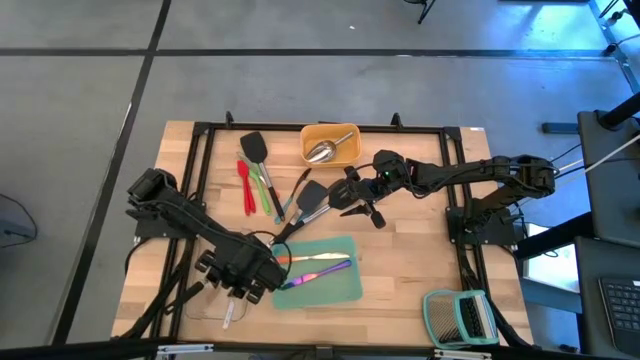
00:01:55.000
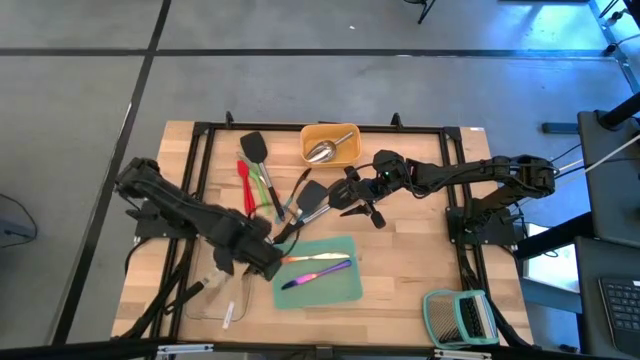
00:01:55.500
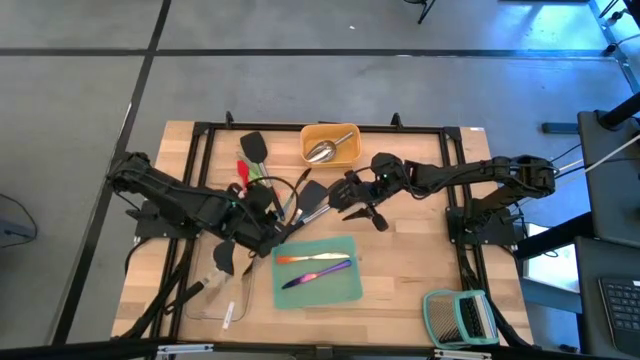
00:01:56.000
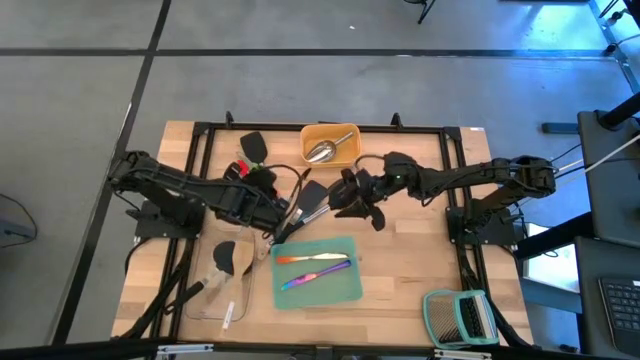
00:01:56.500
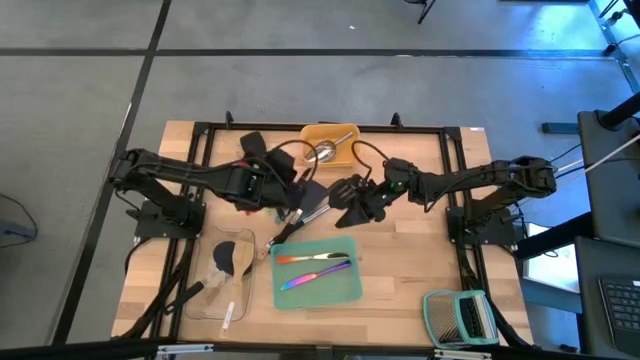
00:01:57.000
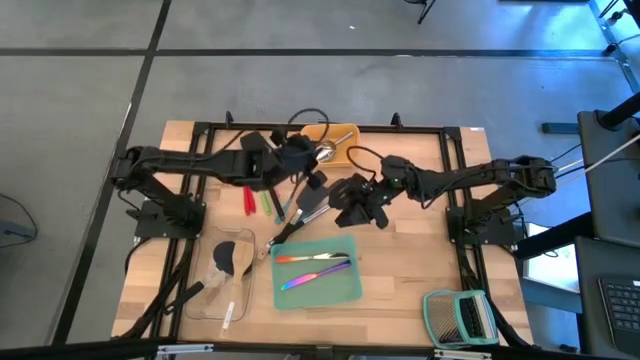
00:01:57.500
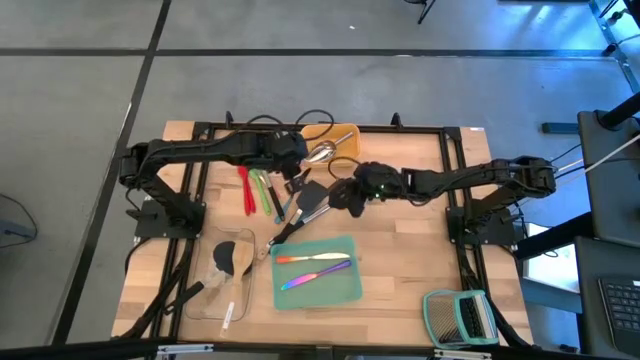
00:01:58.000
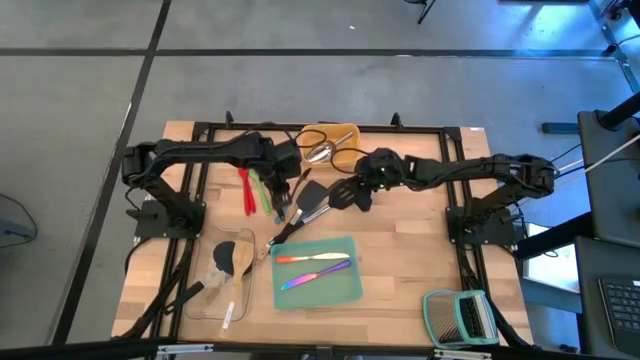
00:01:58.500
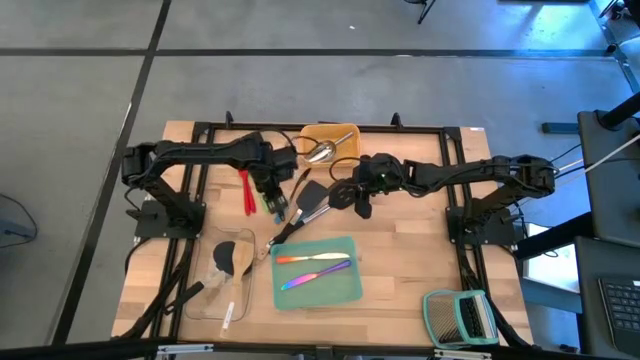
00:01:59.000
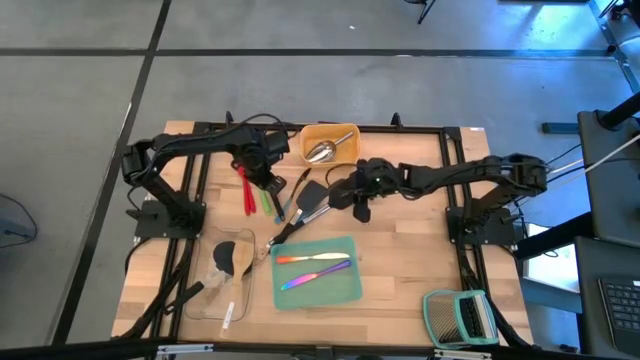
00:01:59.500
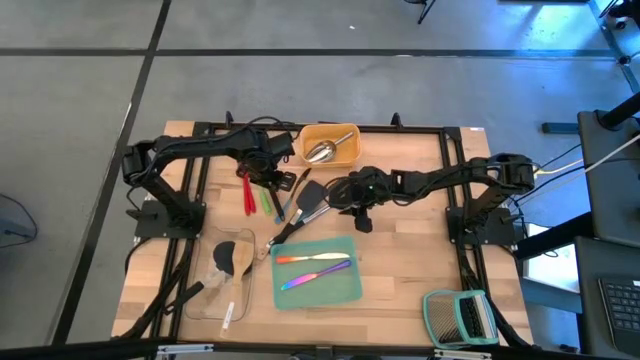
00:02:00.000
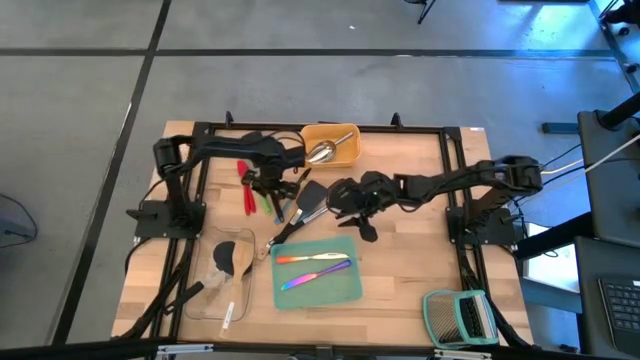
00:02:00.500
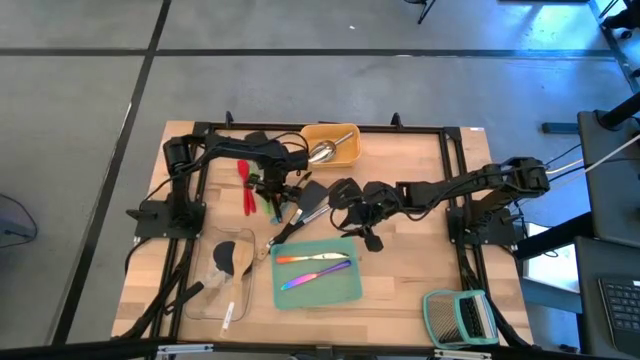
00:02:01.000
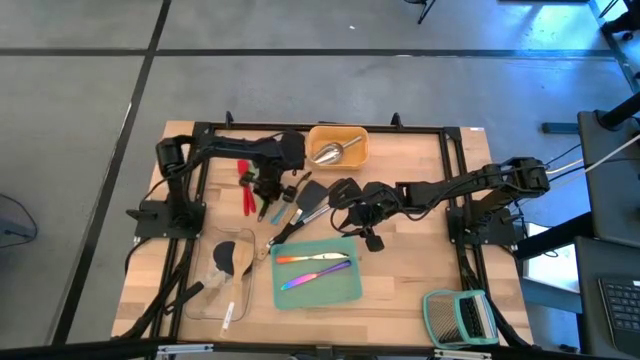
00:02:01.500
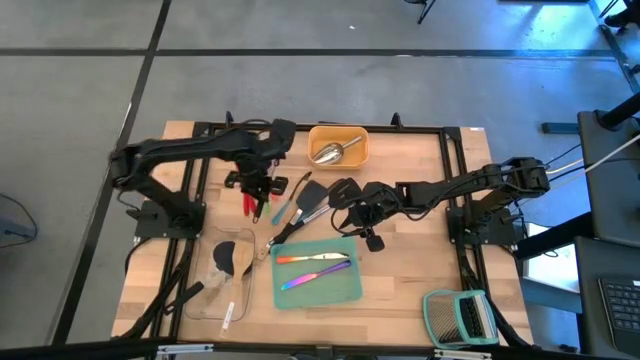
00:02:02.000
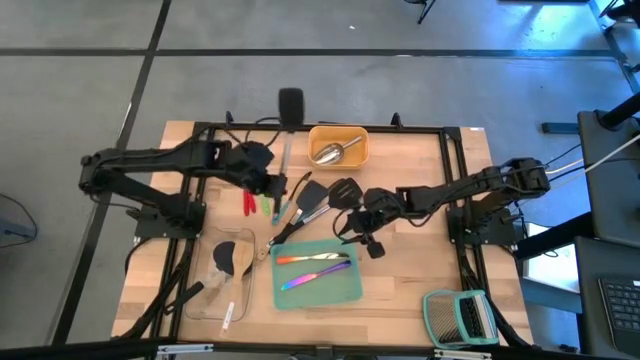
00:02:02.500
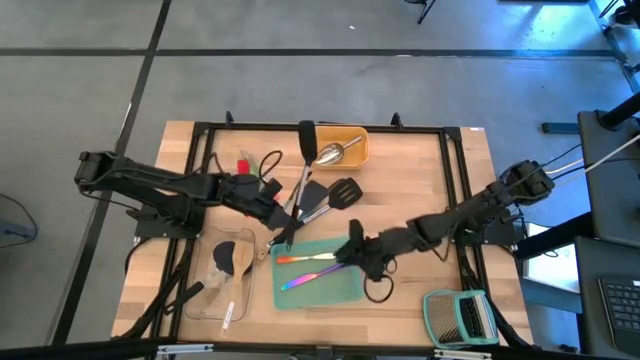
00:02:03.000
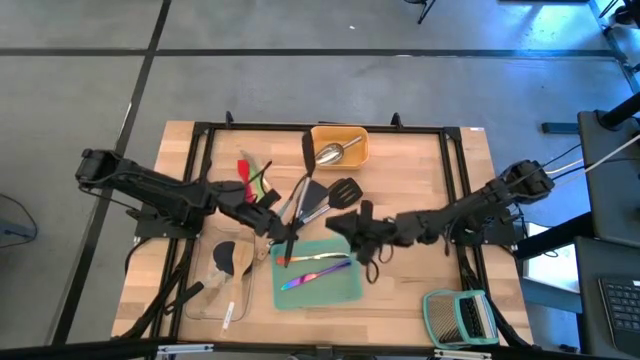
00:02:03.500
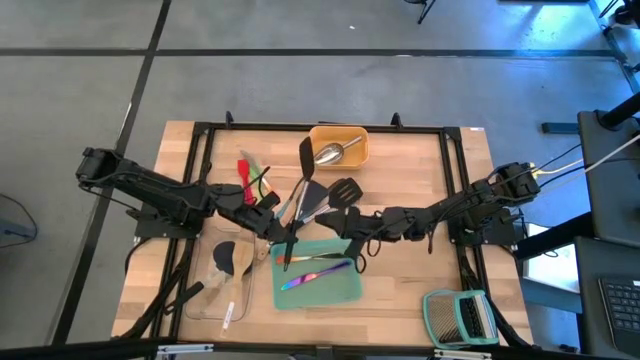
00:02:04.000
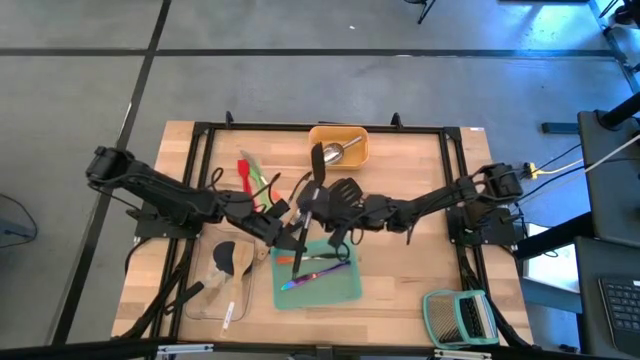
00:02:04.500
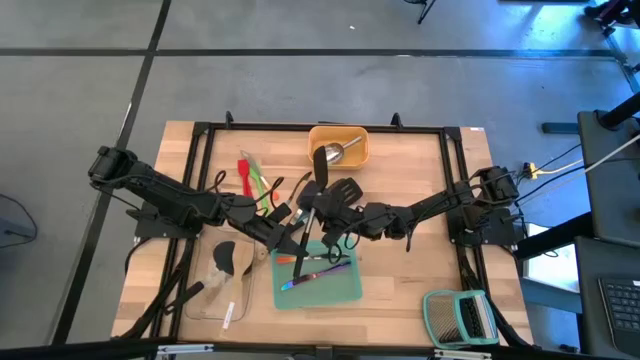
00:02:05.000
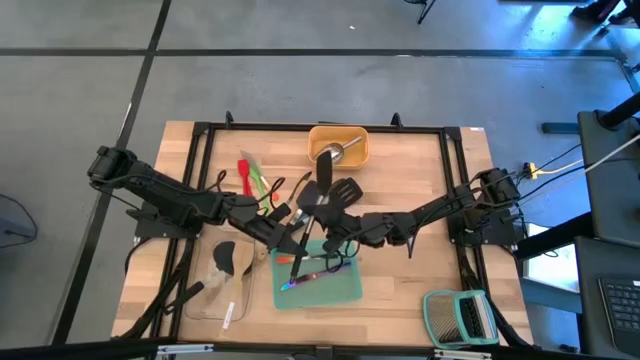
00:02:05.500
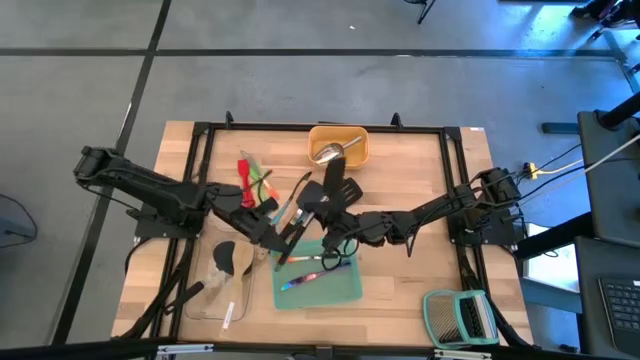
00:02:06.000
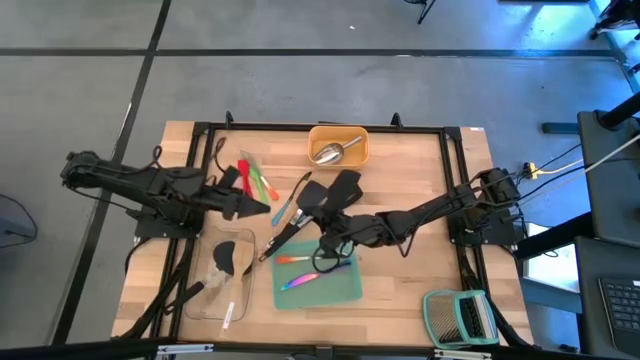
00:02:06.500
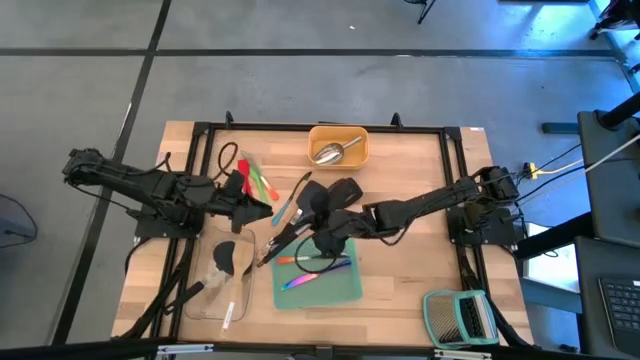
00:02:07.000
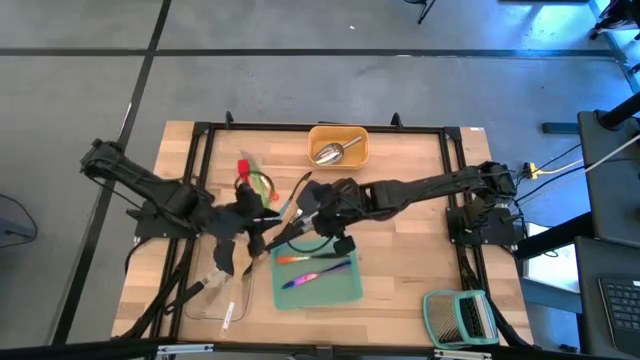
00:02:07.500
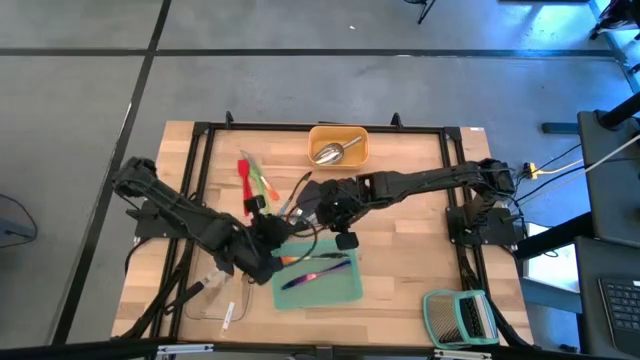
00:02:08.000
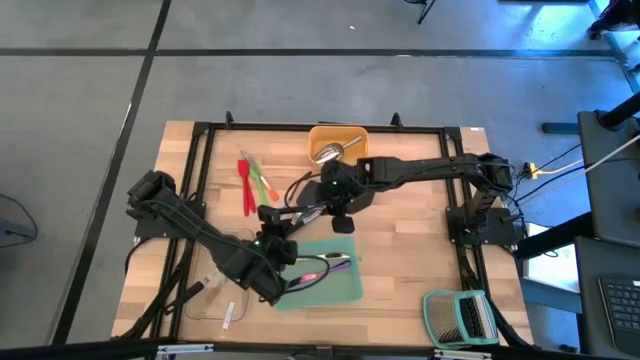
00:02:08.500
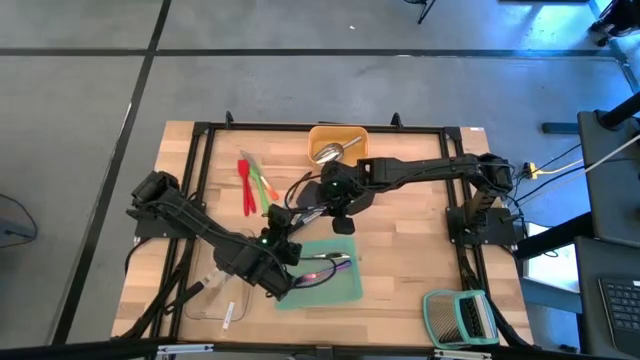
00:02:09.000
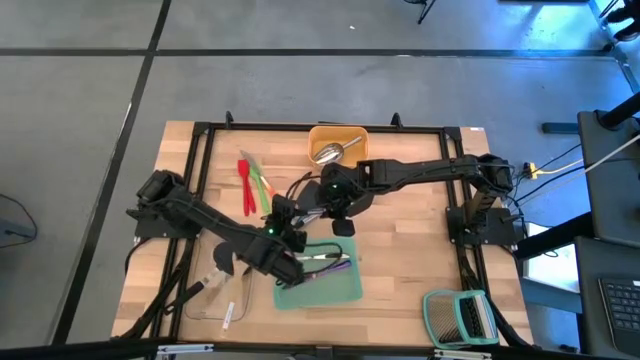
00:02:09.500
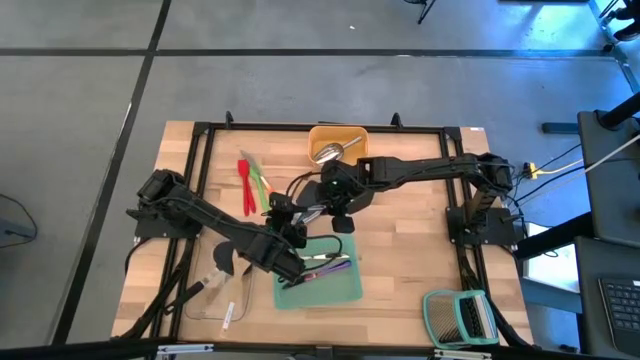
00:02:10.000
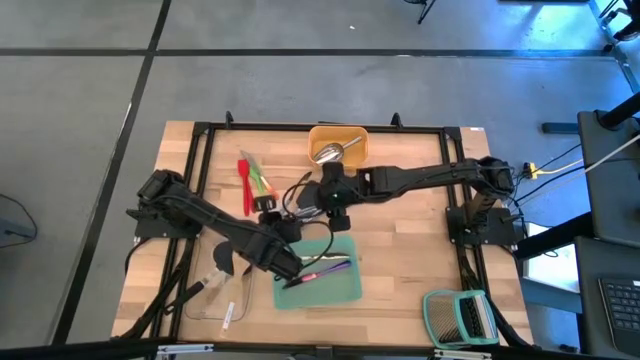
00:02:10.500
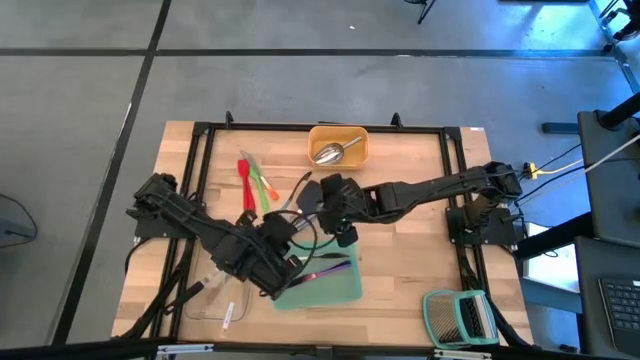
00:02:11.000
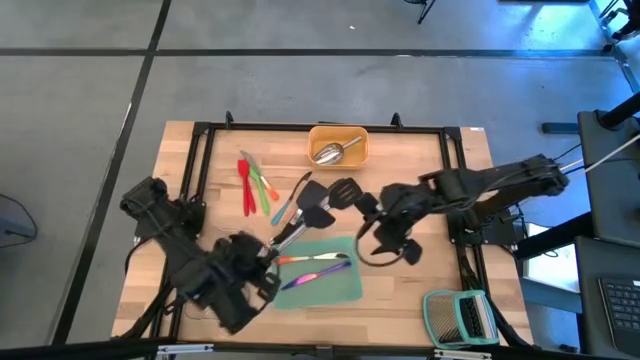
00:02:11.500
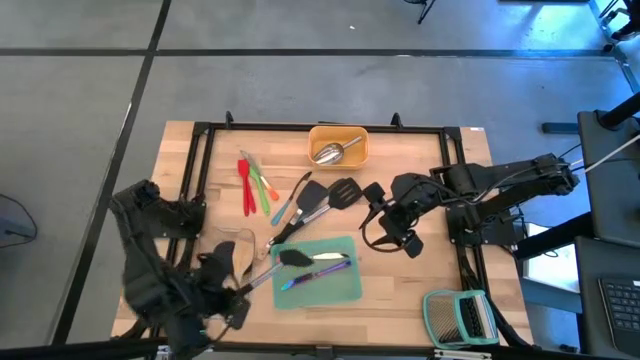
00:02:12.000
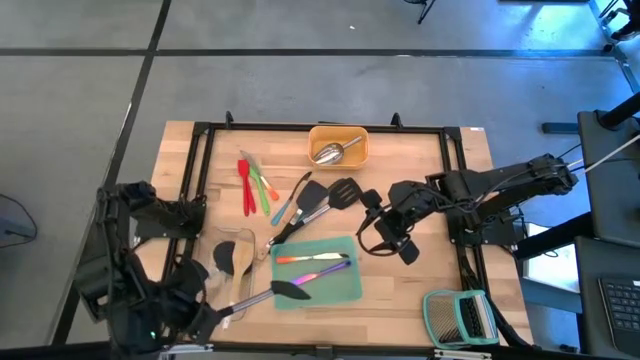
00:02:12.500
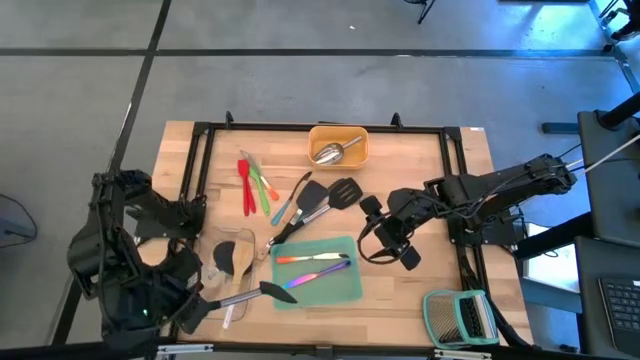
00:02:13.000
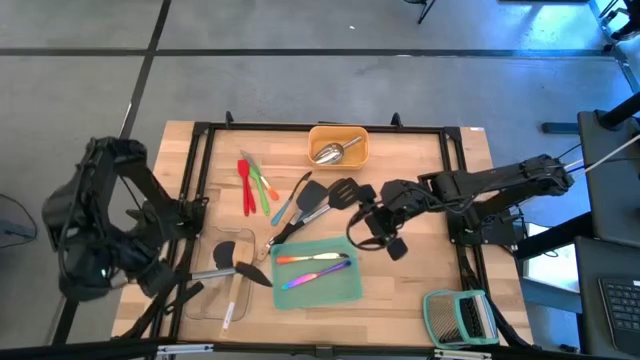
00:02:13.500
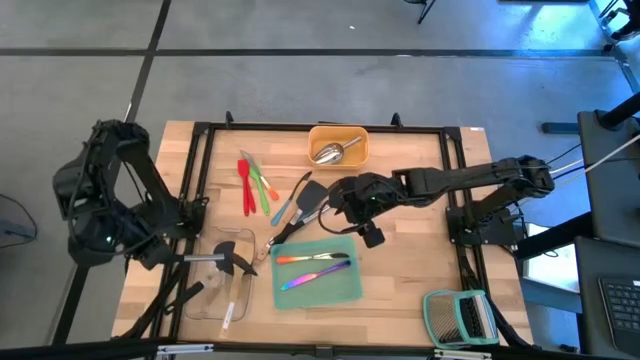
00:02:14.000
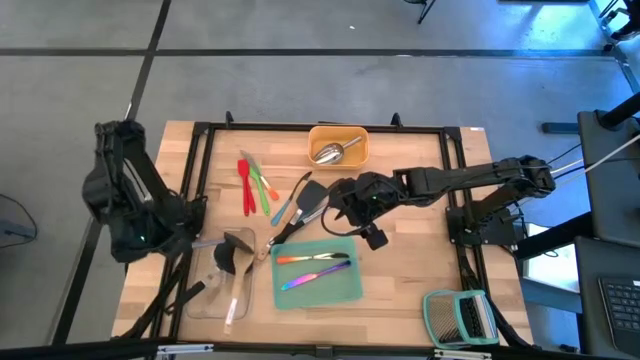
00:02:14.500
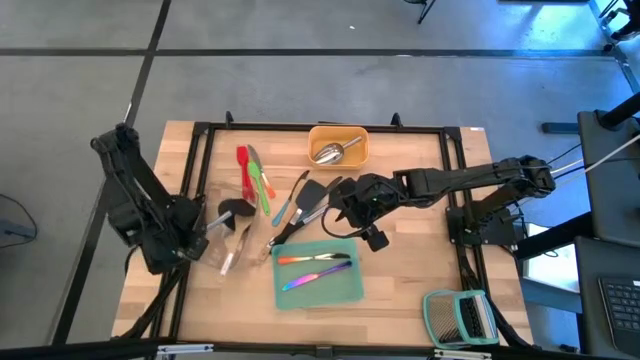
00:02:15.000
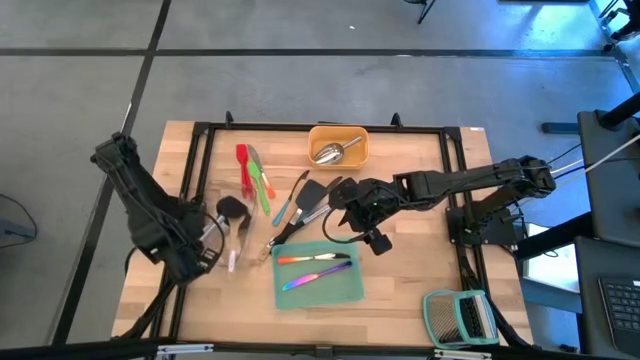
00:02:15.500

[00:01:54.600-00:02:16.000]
Task: Pick & Place Kitchen Items
Put the black spatula into the transparent bin

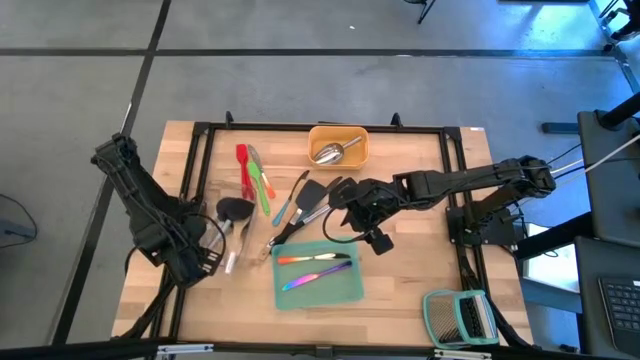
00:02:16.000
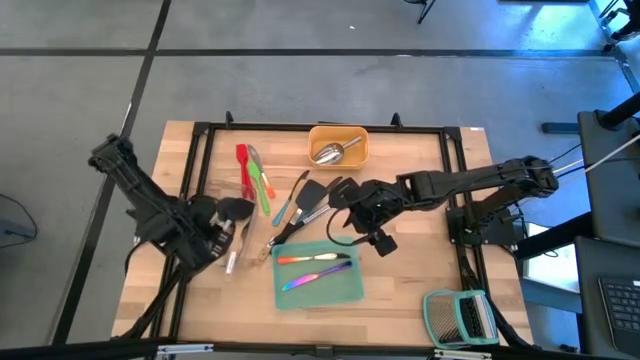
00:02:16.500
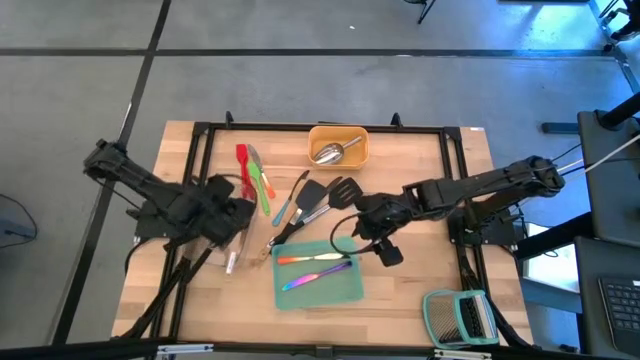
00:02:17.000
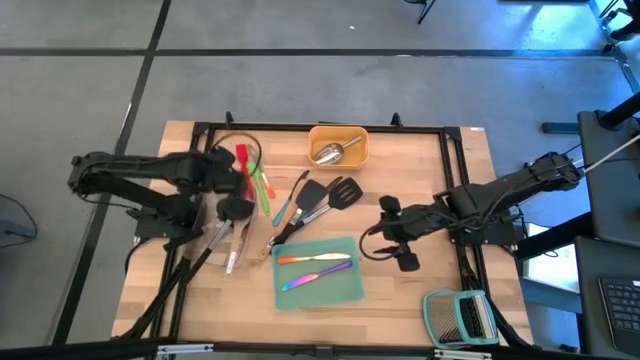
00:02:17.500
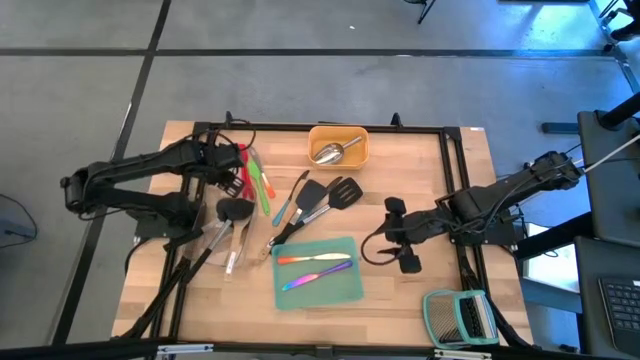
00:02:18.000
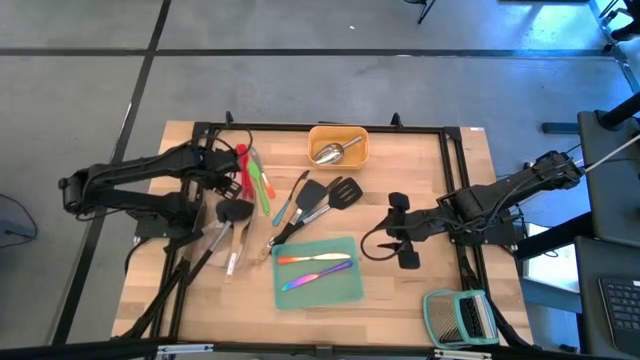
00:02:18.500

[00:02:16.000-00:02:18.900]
Adjust the transparent bin
